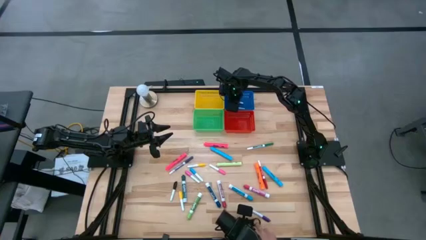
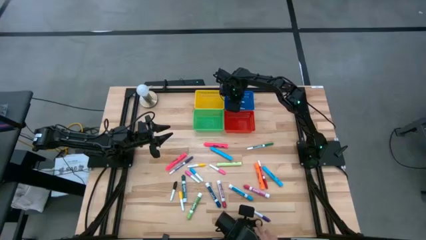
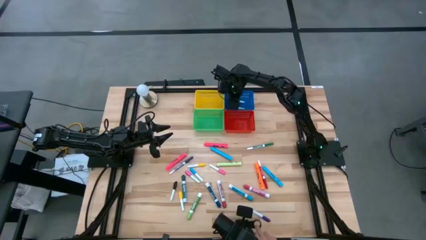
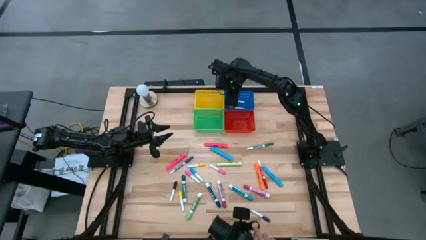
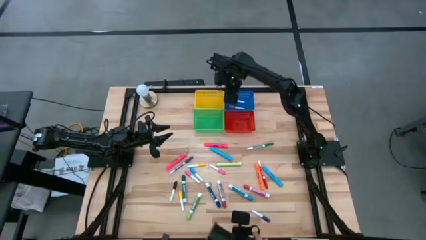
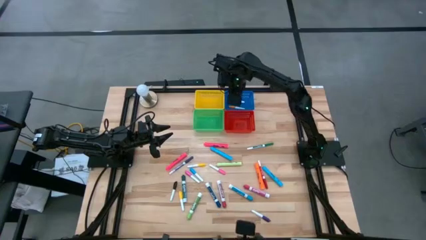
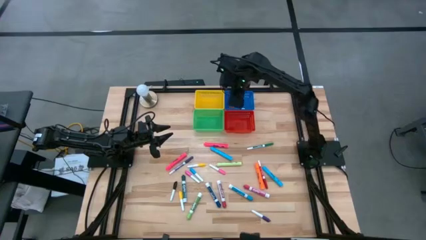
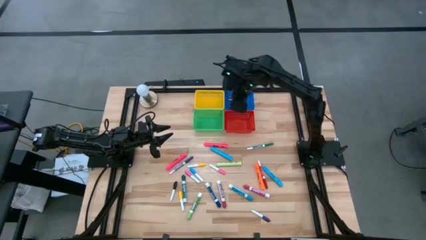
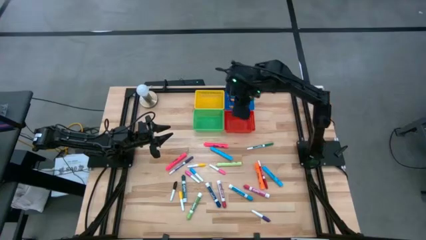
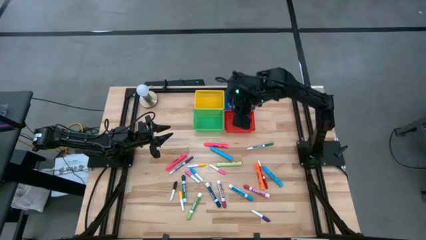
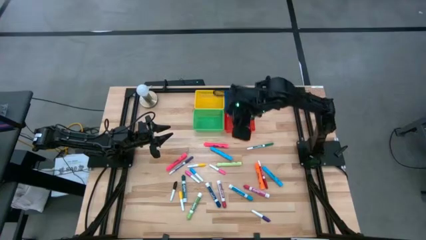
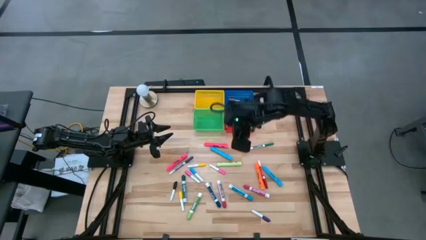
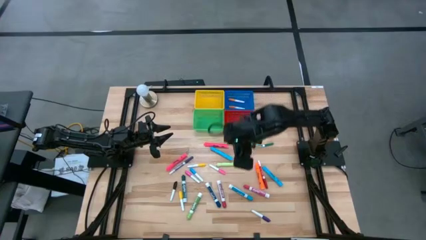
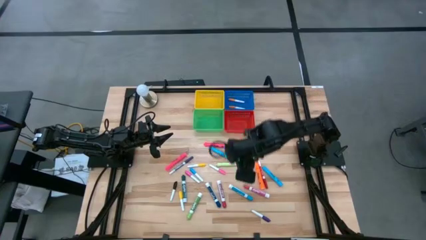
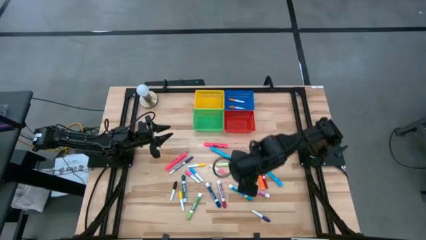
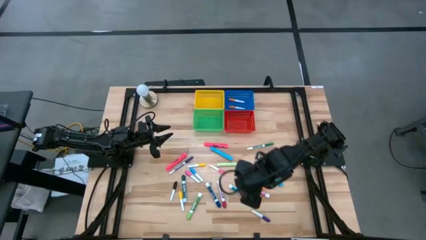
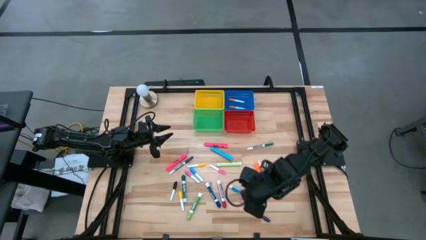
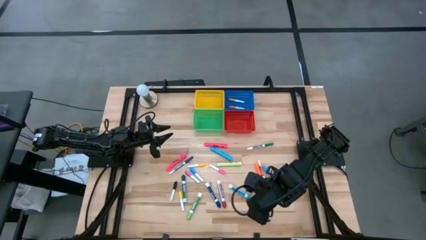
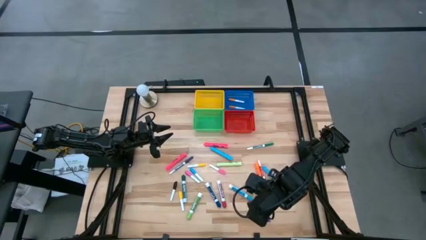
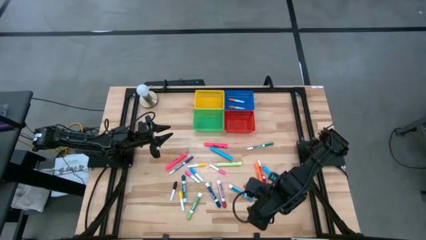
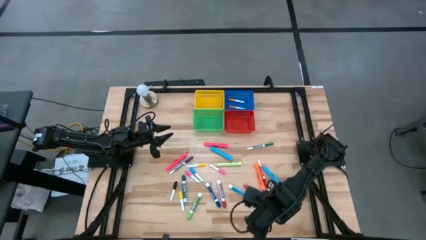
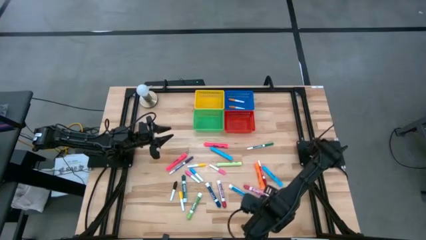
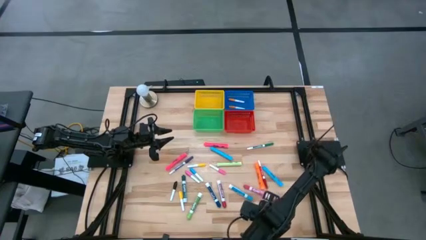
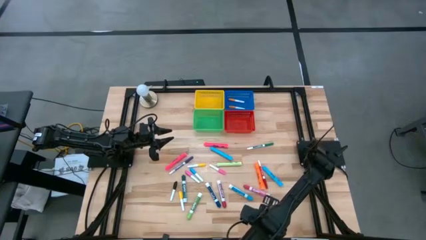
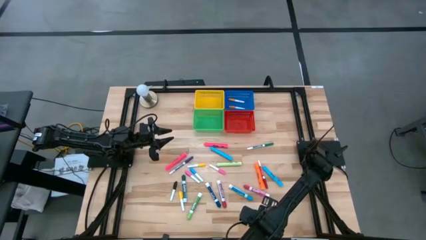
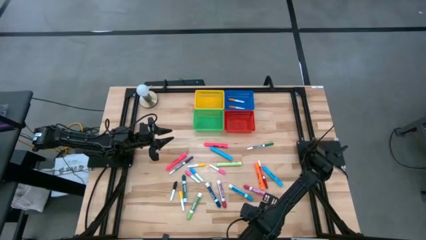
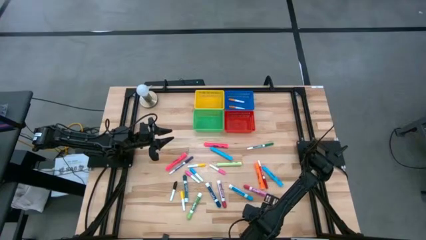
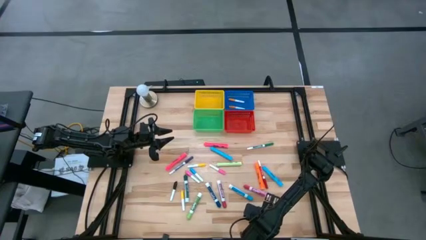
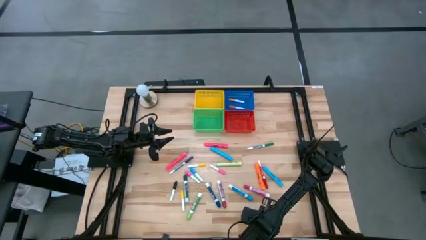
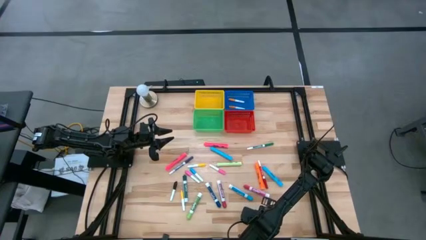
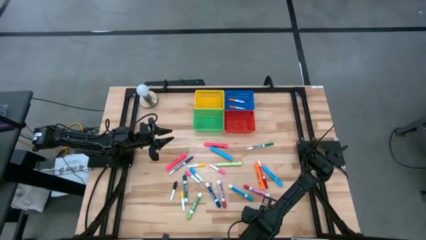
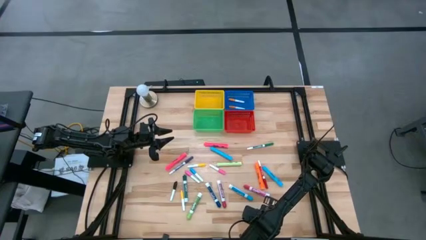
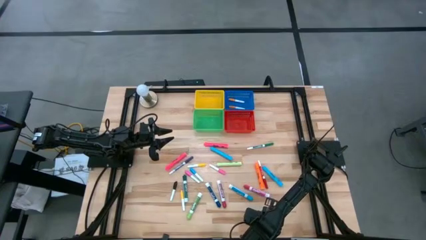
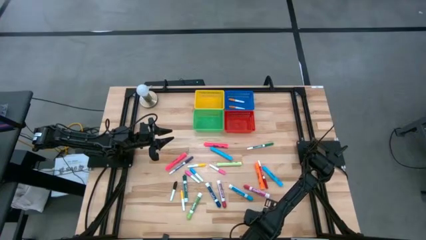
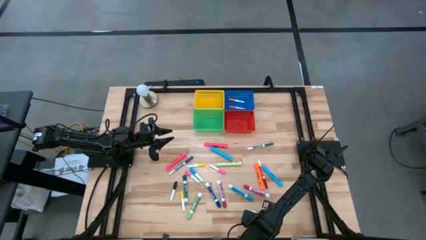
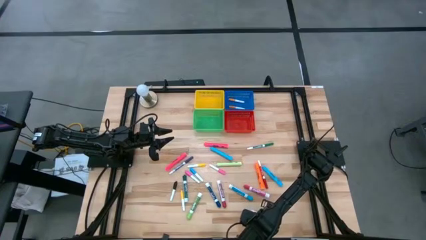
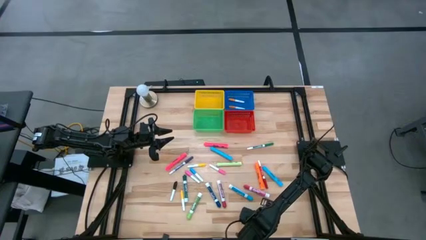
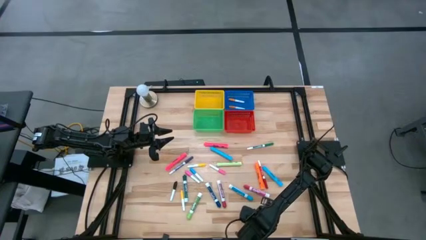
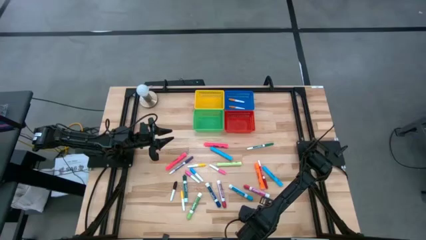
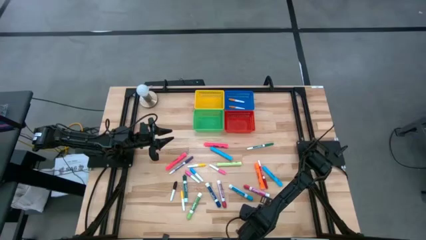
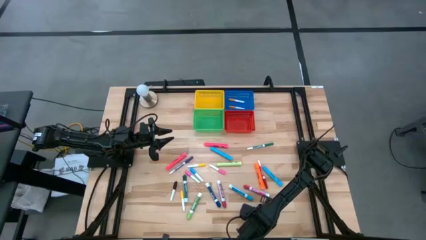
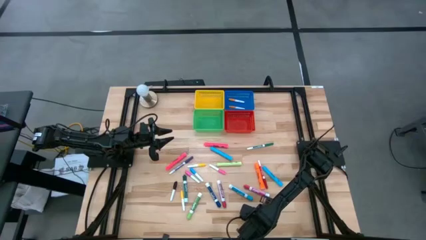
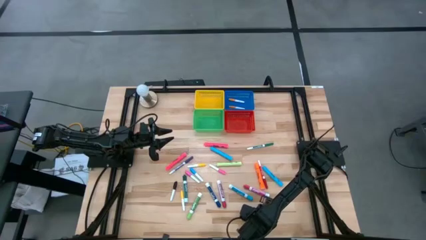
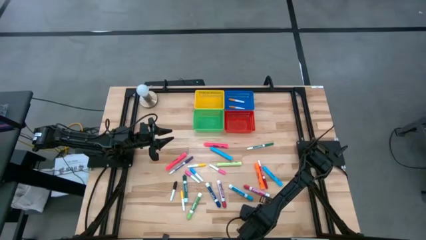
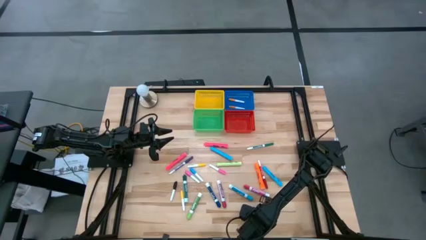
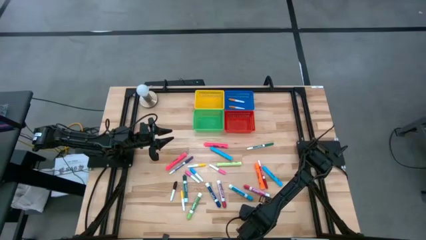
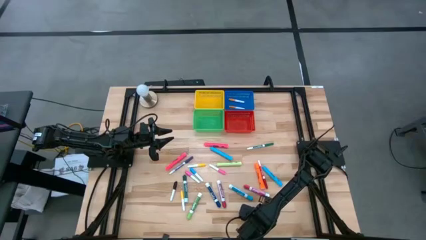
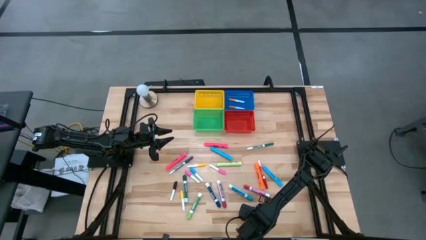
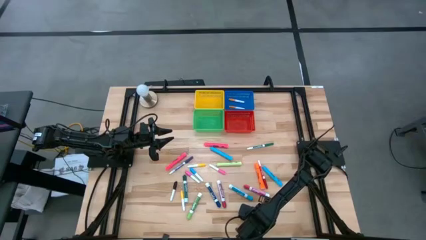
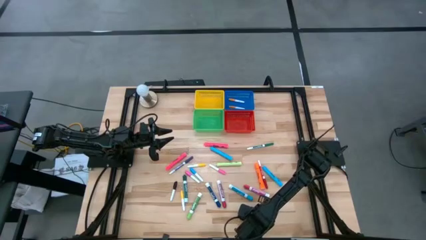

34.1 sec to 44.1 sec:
Task: Pick & Place Markers
Put the small violet highlighter pen into the blue bin
